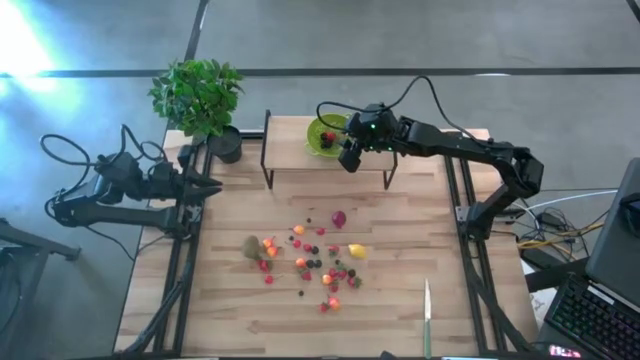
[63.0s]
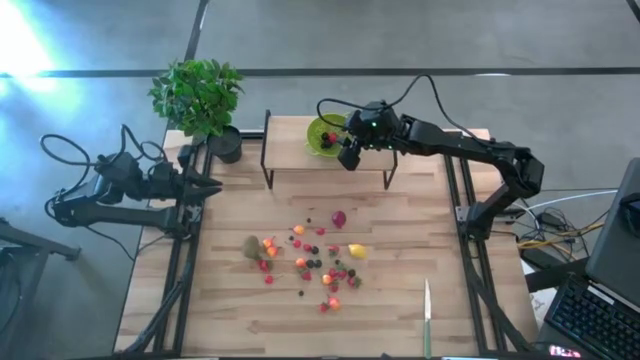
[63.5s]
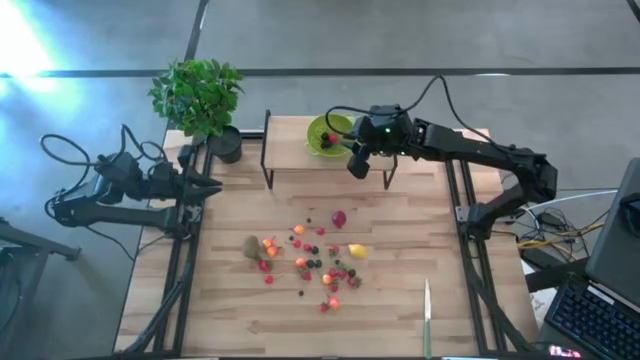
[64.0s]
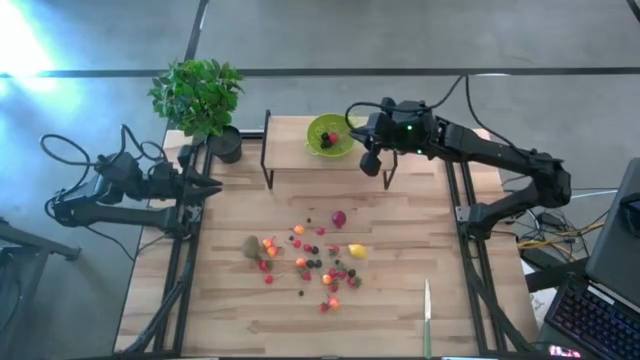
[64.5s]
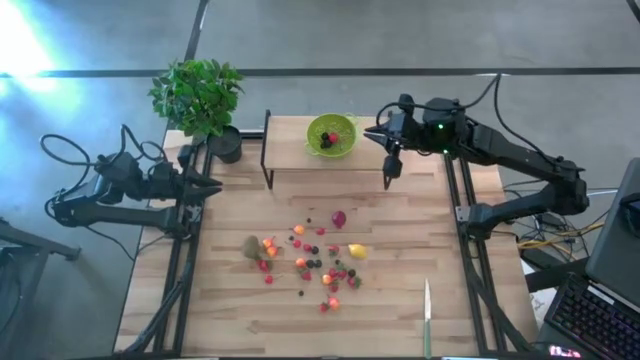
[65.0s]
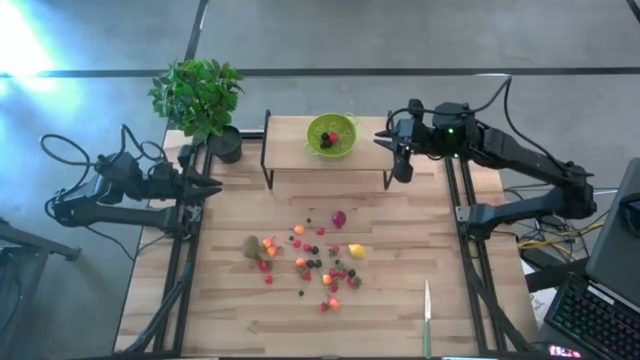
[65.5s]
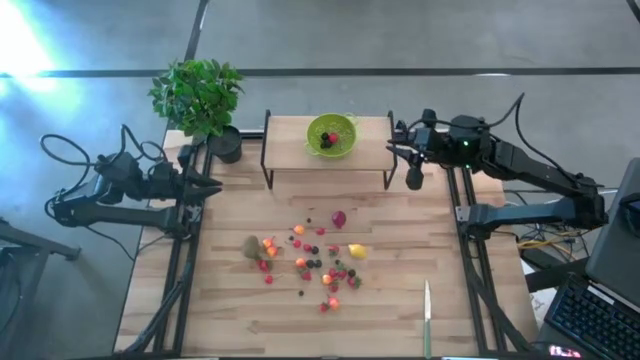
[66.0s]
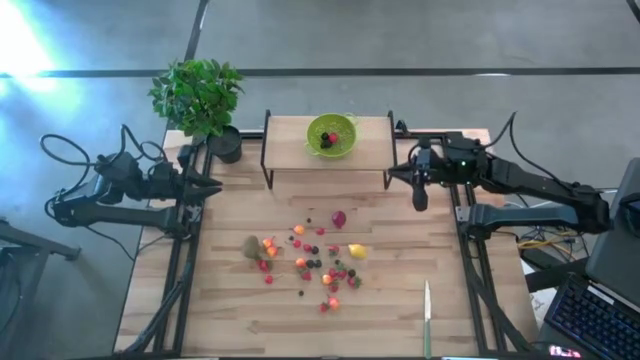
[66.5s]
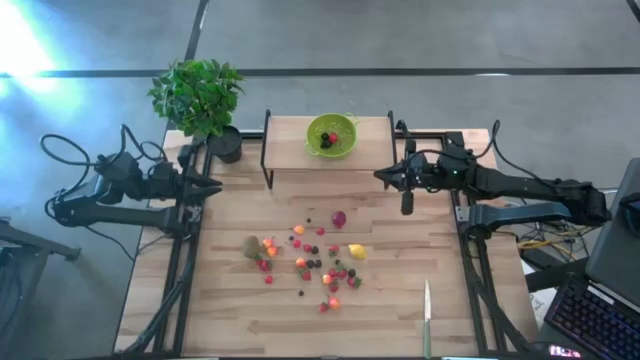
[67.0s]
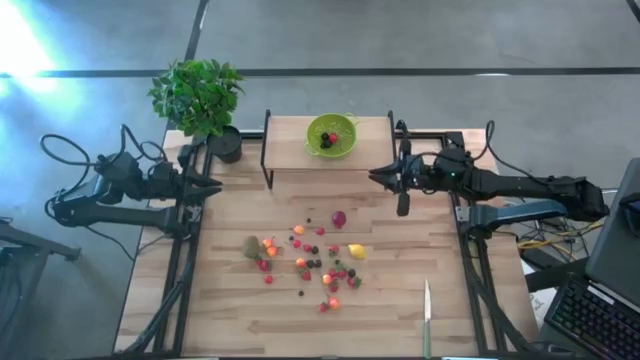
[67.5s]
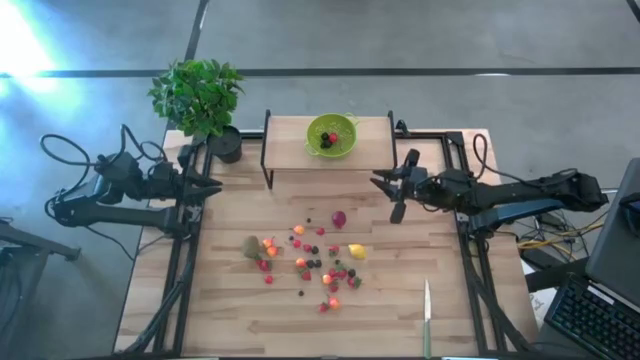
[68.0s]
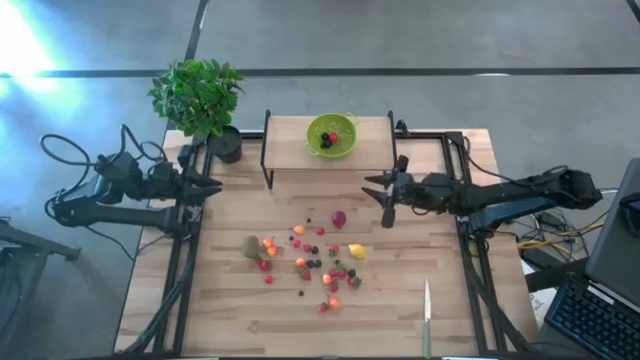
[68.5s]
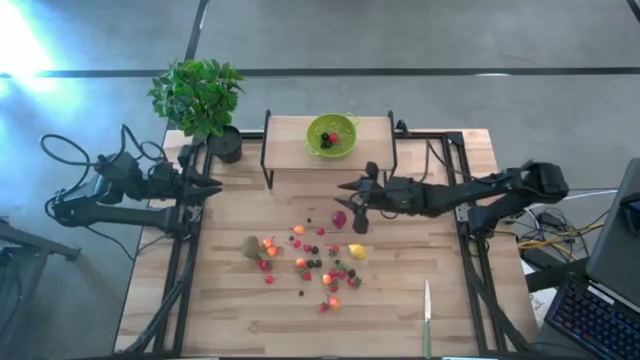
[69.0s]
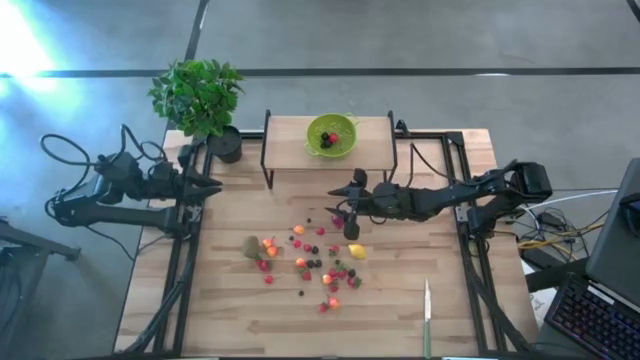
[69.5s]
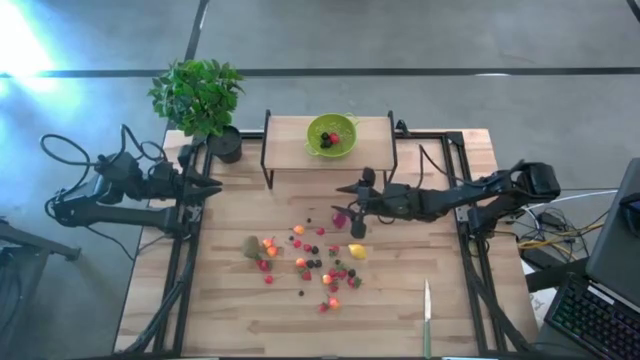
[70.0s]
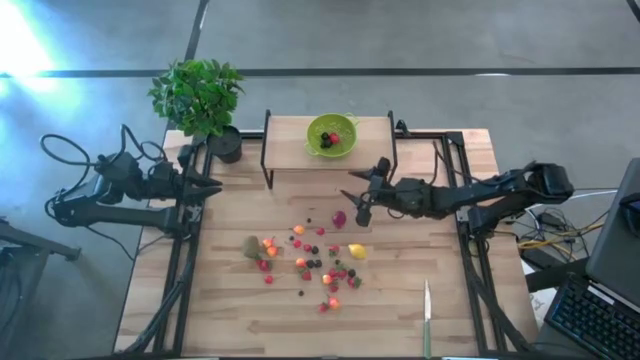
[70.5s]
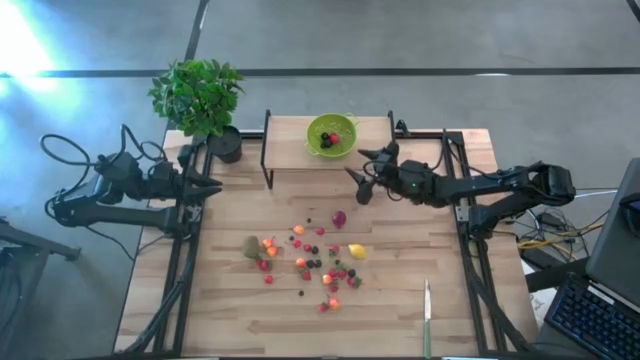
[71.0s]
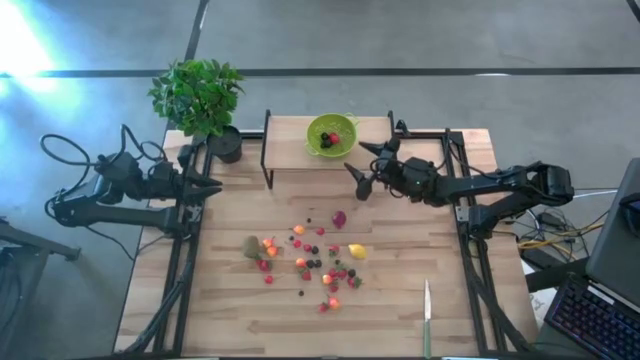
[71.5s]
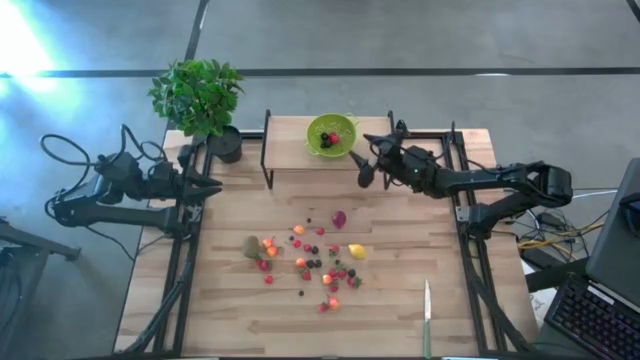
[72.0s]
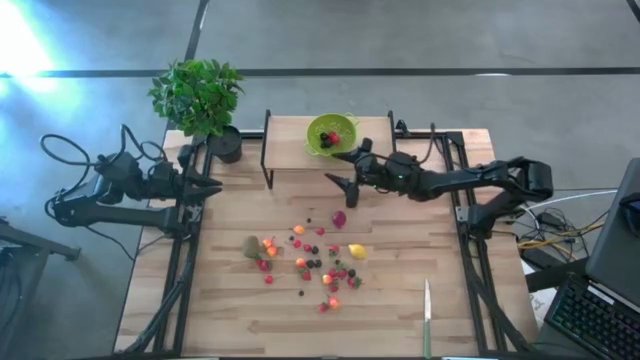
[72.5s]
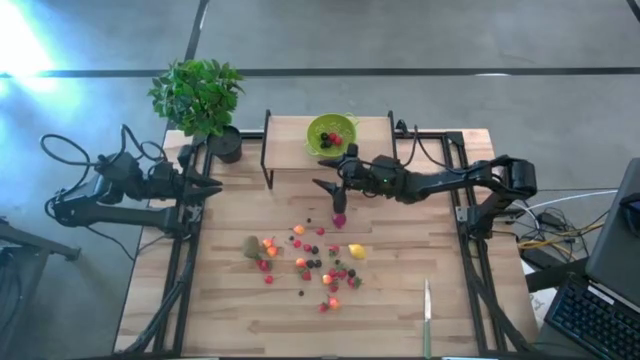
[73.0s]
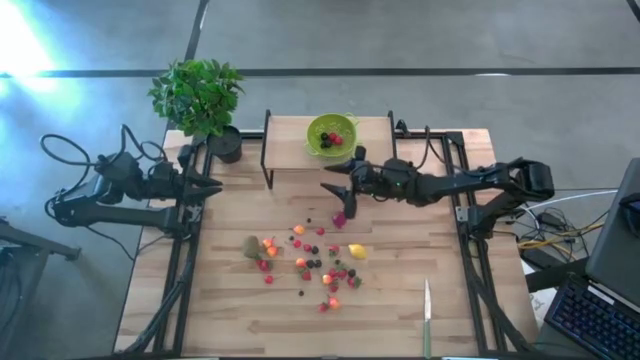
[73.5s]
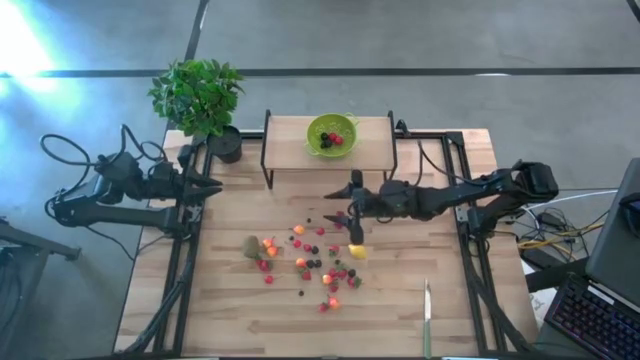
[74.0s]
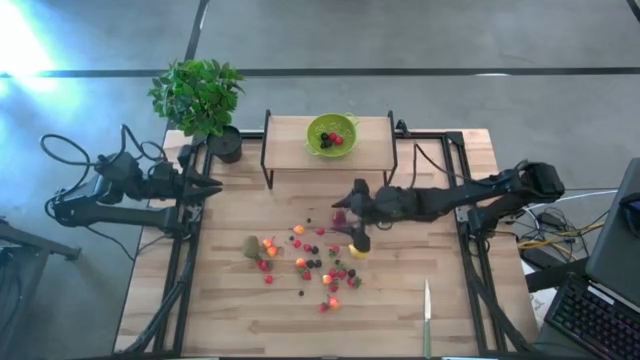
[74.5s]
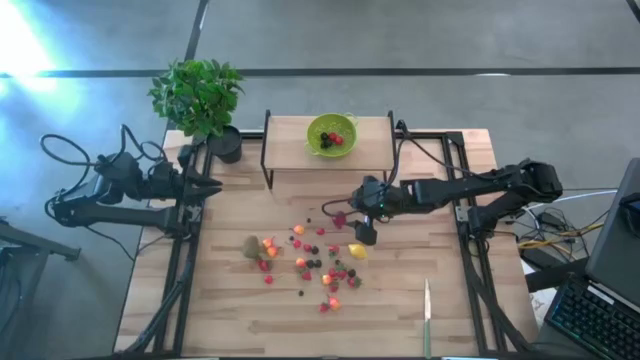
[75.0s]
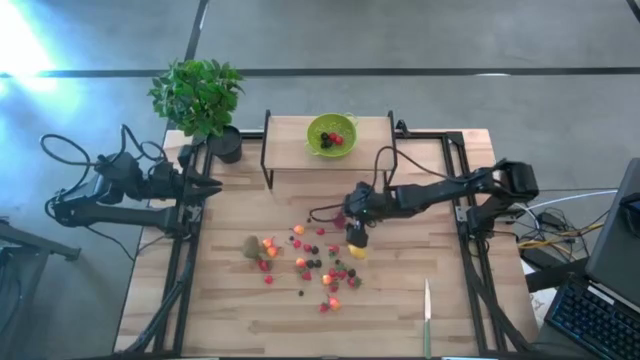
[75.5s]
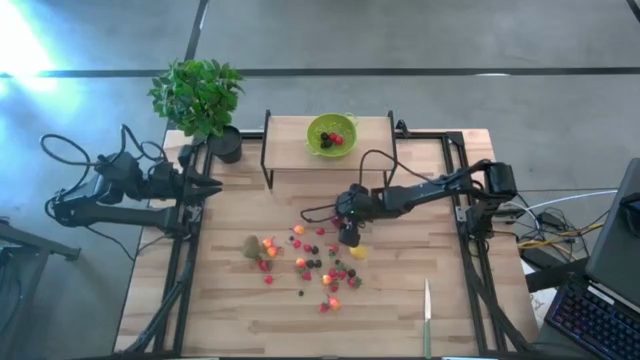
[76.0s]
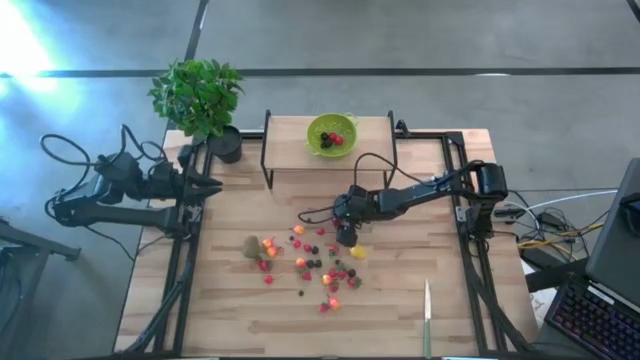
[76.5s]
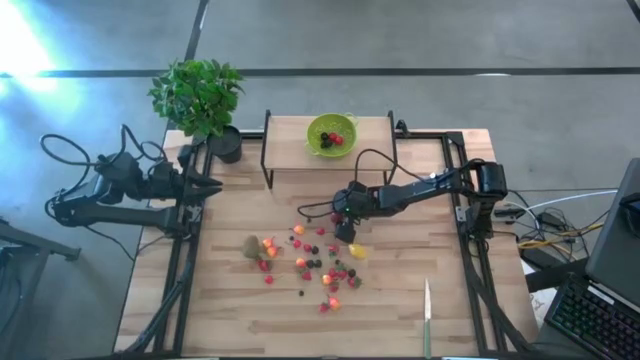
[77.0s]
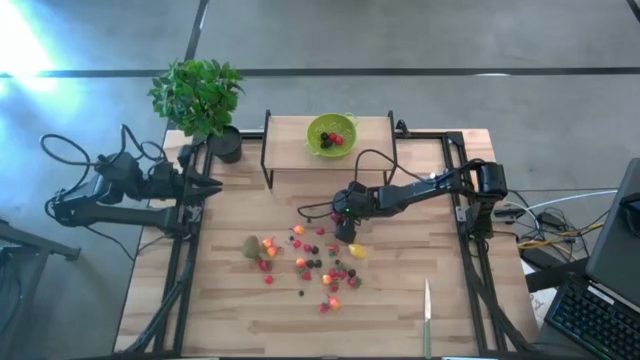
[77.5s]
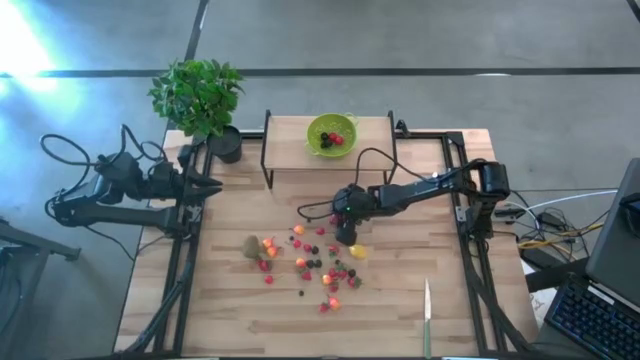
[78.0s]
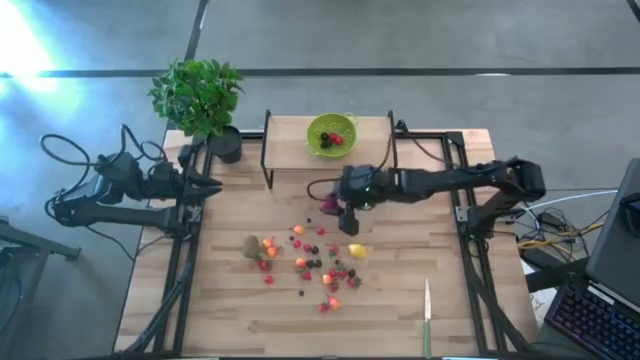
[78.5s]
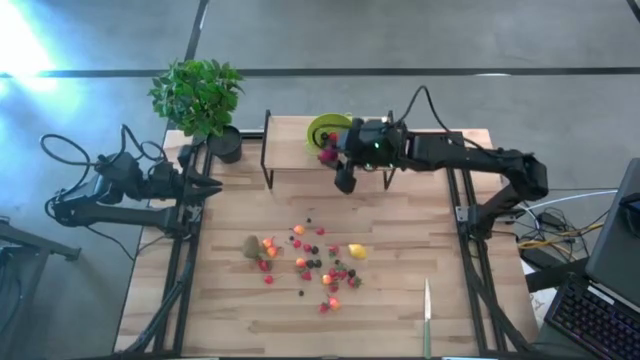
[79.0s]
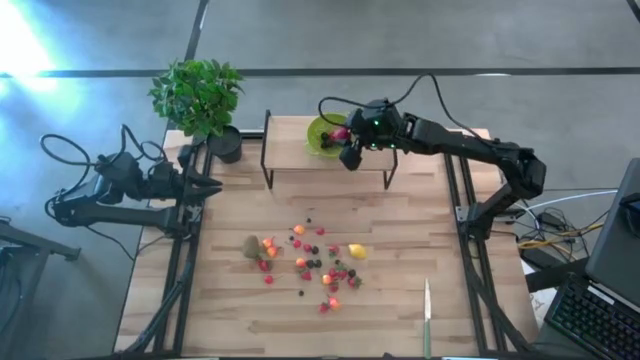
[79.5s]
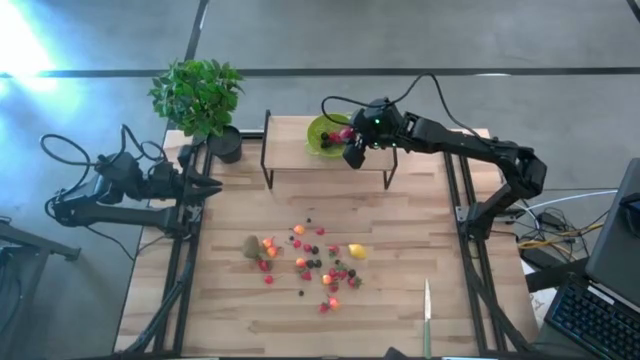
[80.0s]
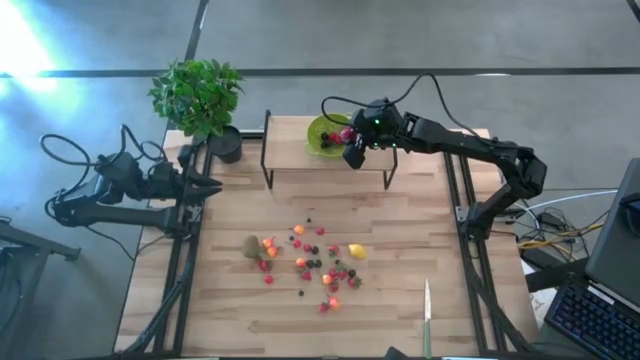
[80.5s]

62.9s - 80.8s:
Task: Pick & Place Fruit
Put the red pomegranate into the green strainer bowl on the shelf

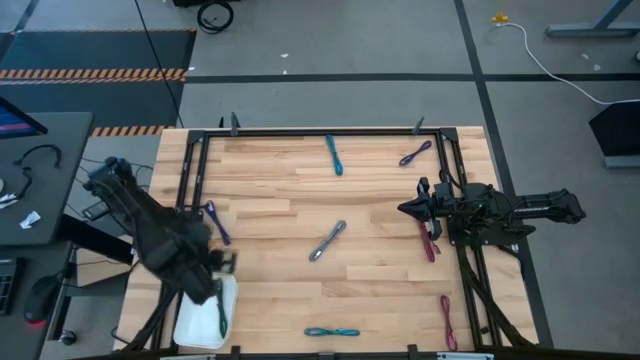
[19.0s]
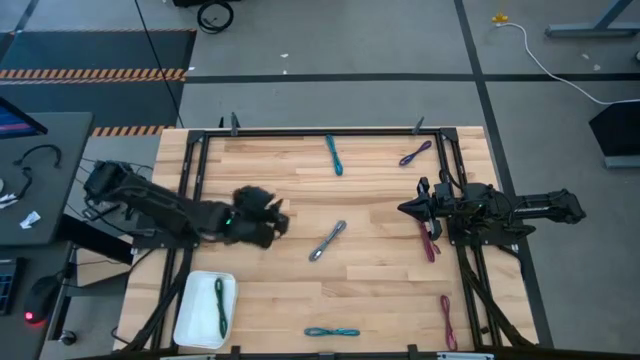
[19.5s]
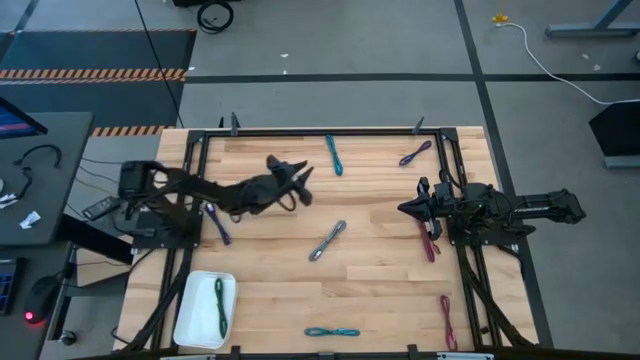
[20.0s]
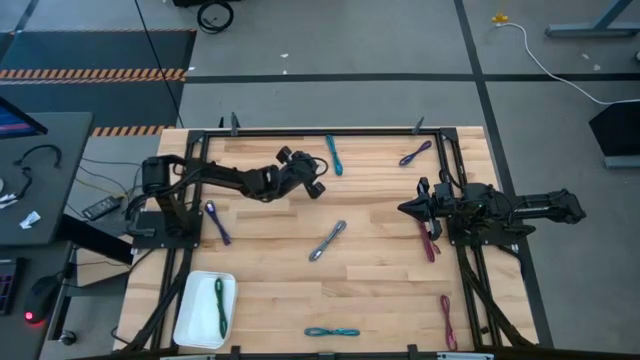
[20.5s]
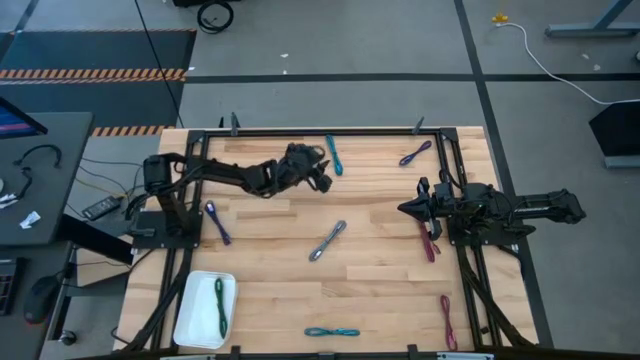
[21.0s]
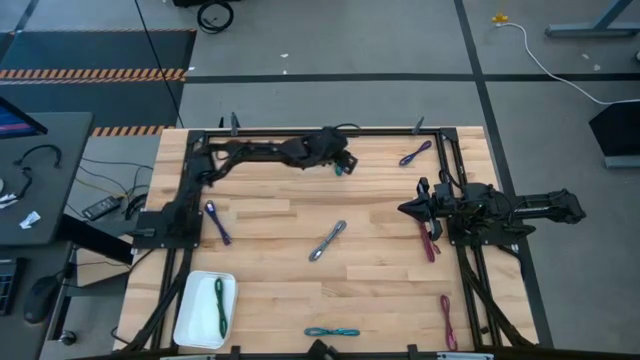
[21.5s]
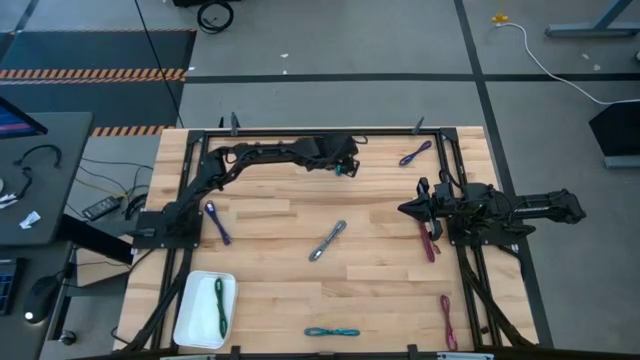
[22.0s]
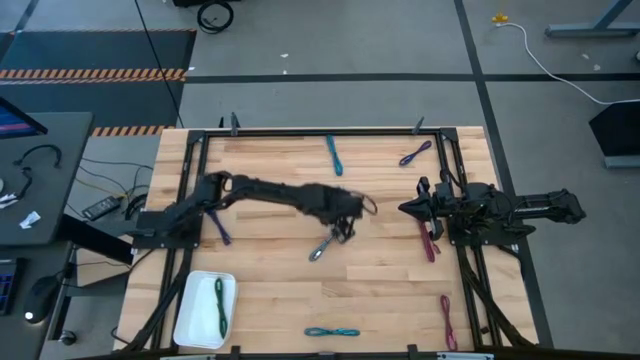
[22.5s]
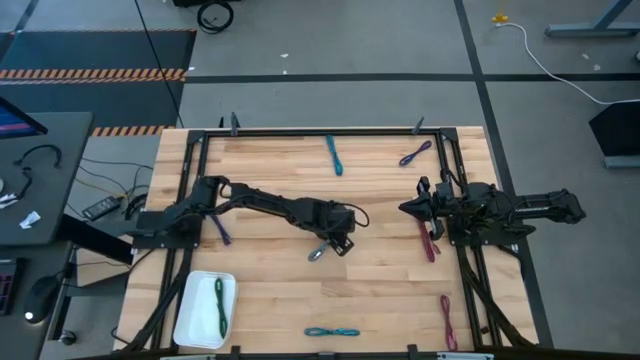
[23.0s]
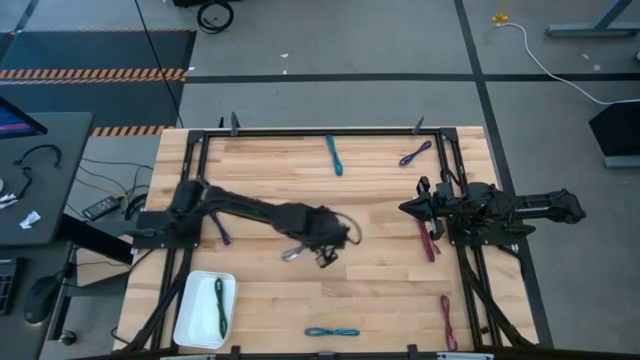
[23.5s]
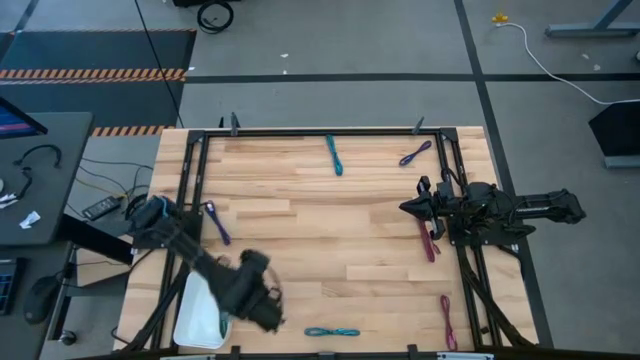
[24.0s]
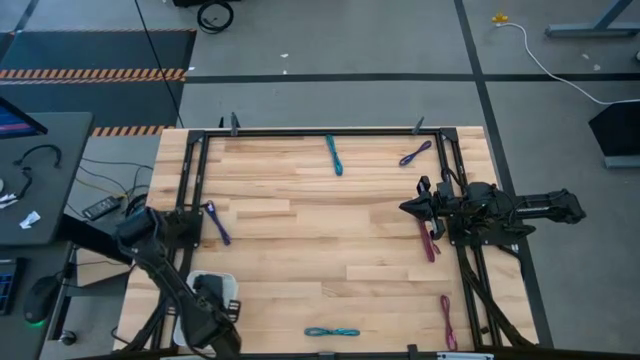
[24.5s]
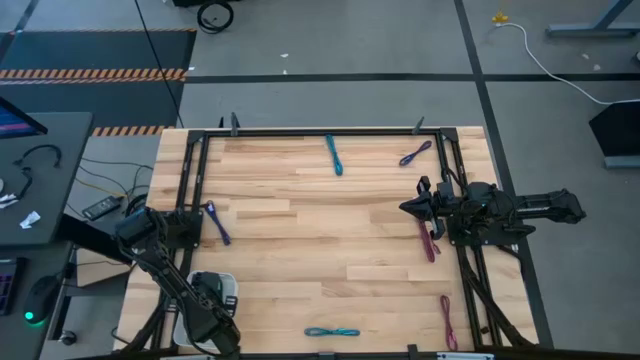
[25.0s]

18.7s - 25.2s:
Task: Pick and place USB-C Cables
Put the silver charger cable into the white bin
